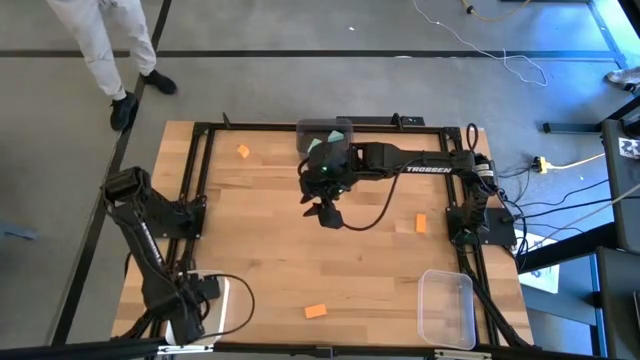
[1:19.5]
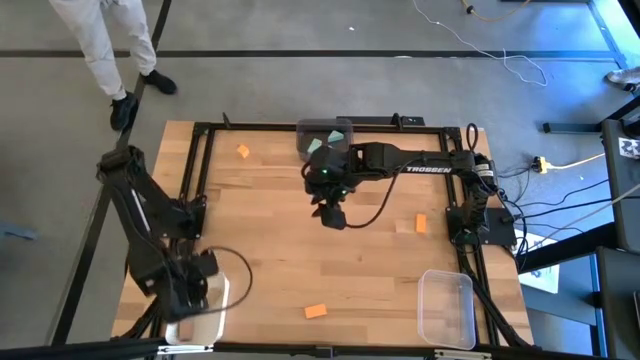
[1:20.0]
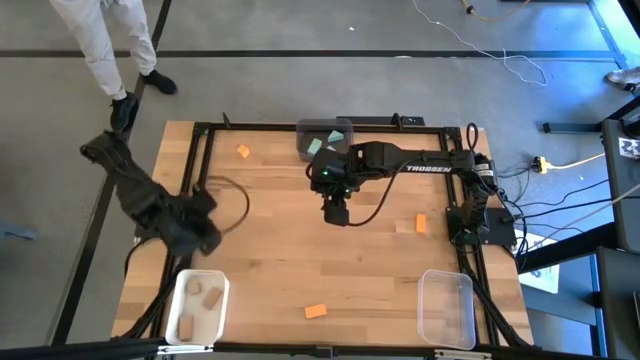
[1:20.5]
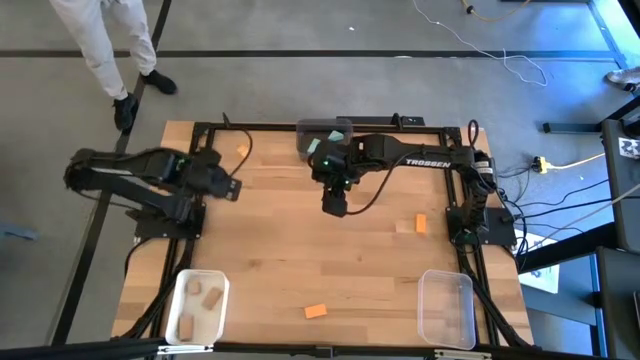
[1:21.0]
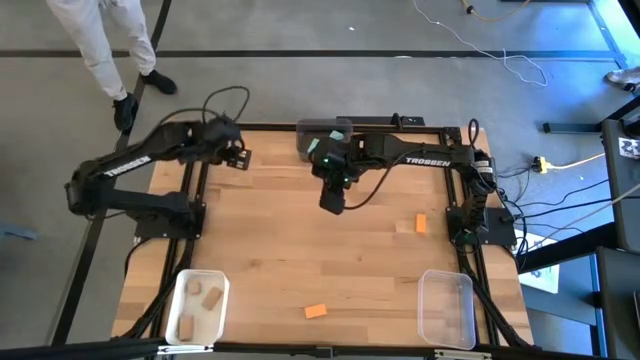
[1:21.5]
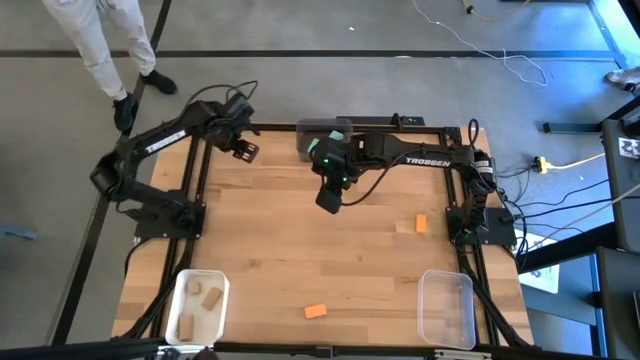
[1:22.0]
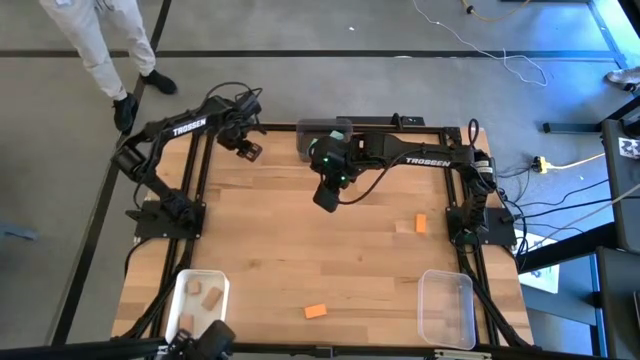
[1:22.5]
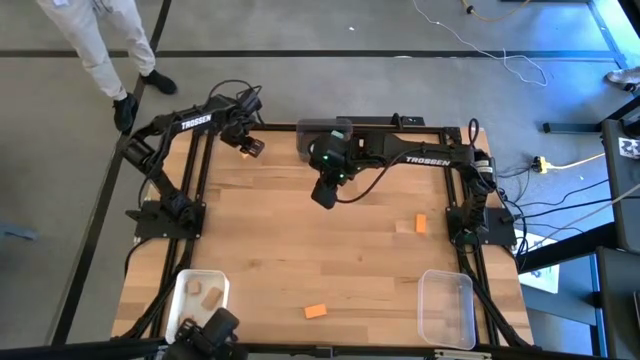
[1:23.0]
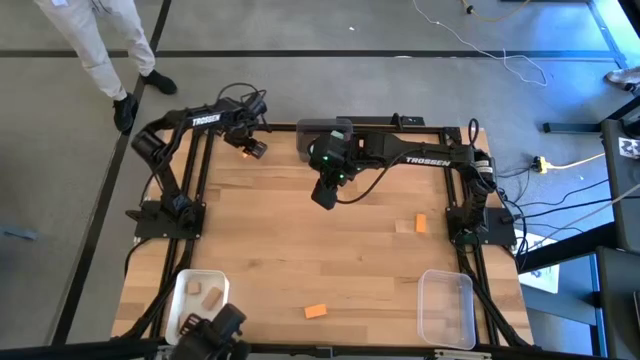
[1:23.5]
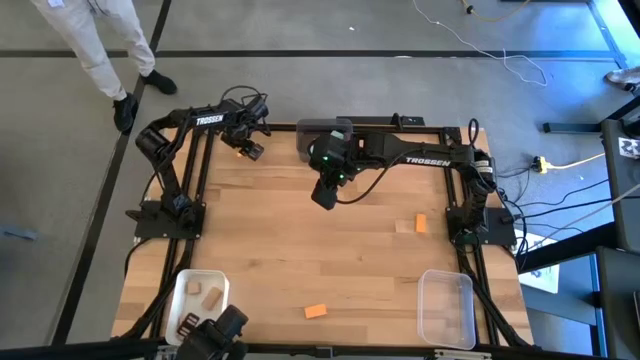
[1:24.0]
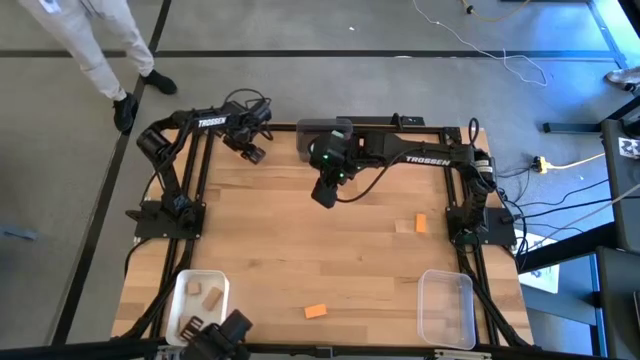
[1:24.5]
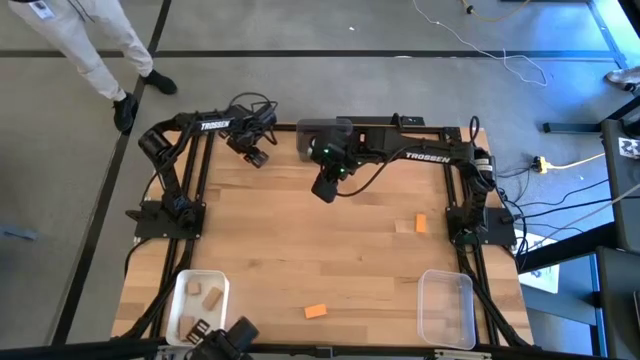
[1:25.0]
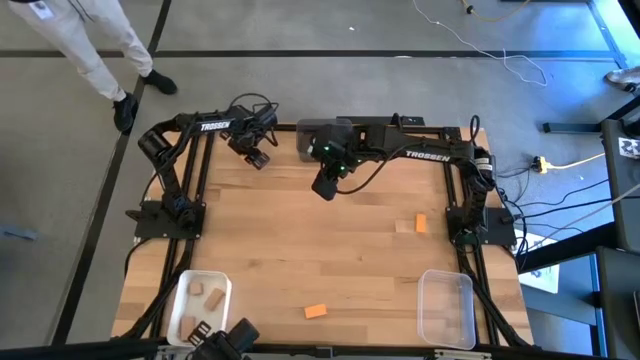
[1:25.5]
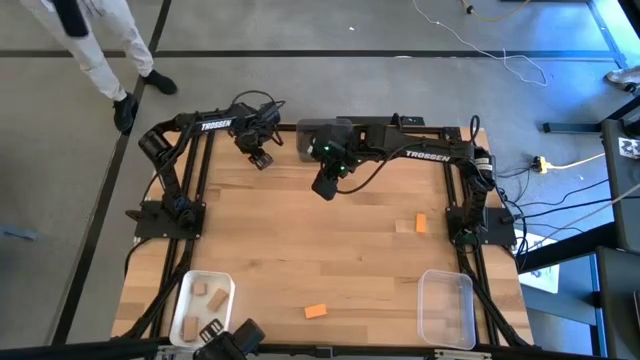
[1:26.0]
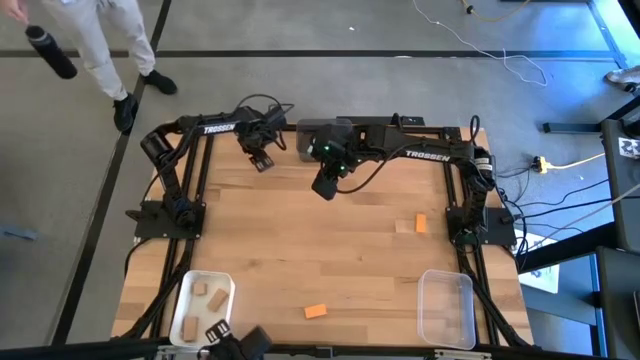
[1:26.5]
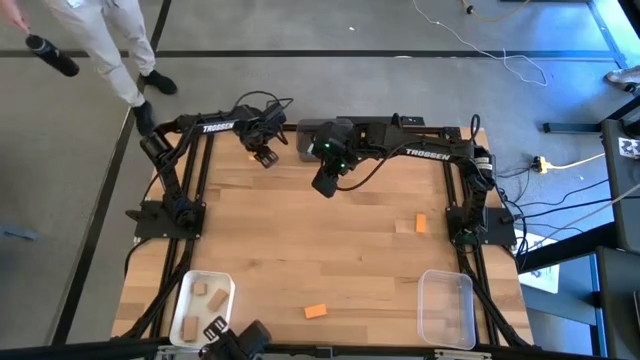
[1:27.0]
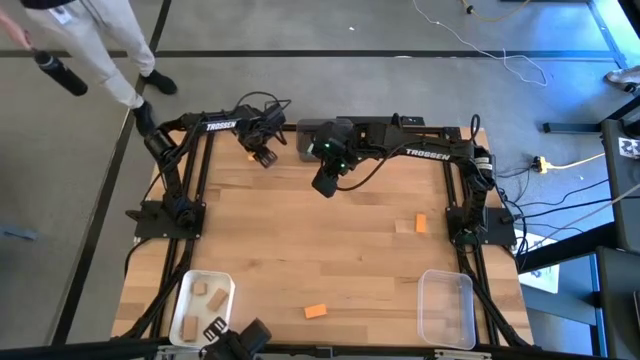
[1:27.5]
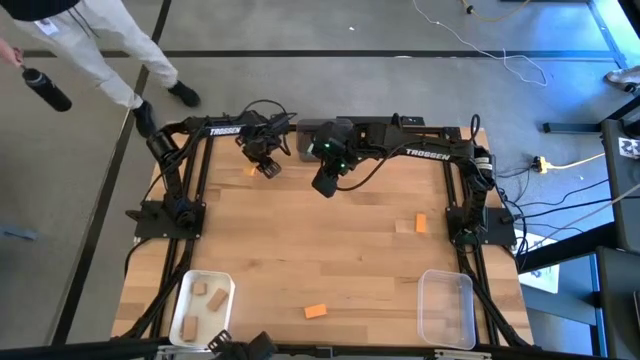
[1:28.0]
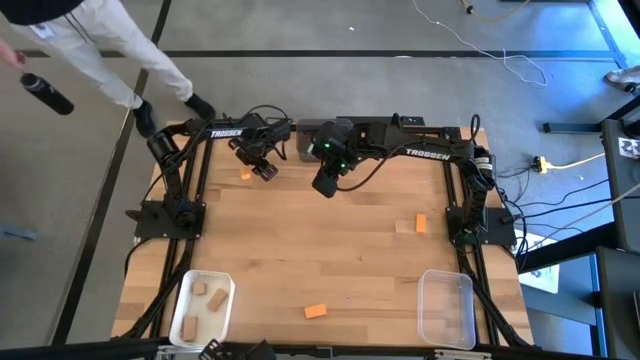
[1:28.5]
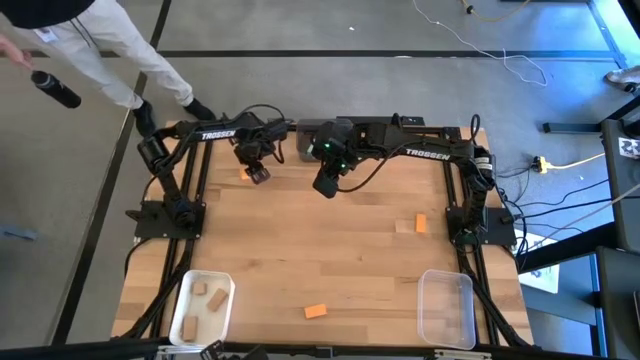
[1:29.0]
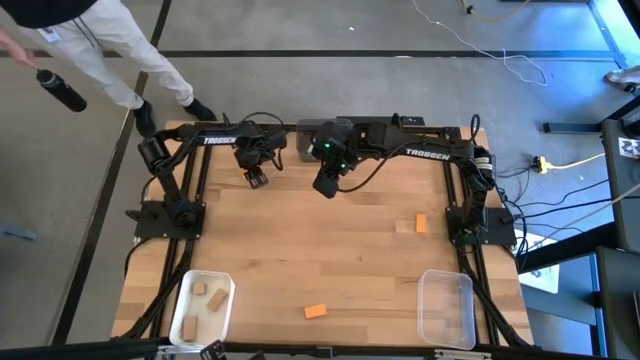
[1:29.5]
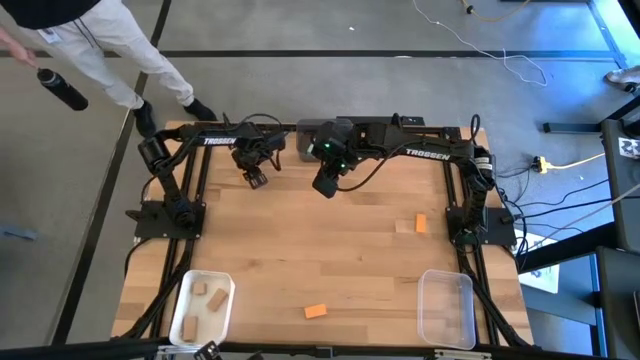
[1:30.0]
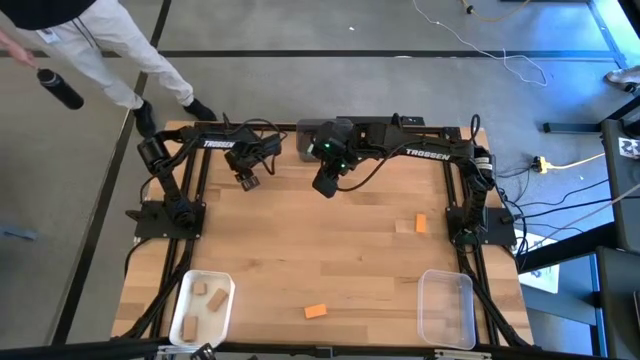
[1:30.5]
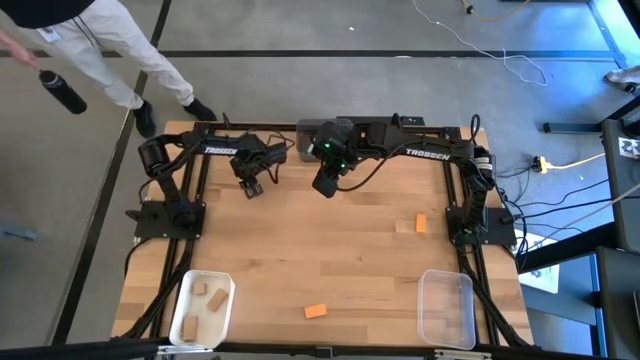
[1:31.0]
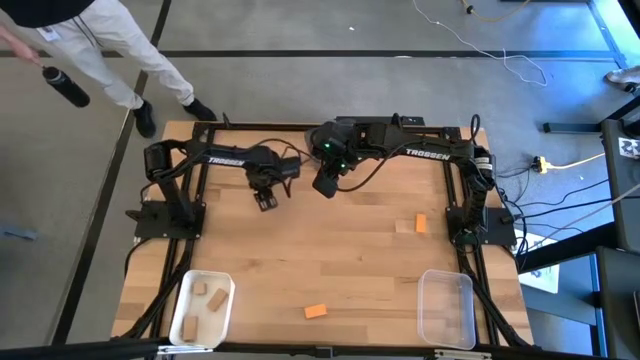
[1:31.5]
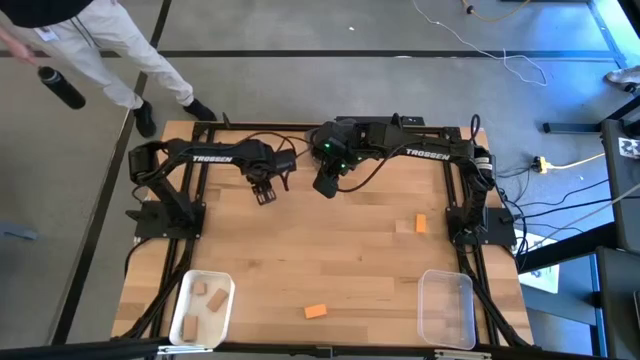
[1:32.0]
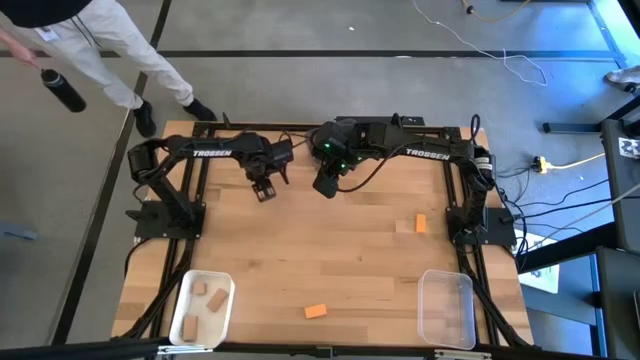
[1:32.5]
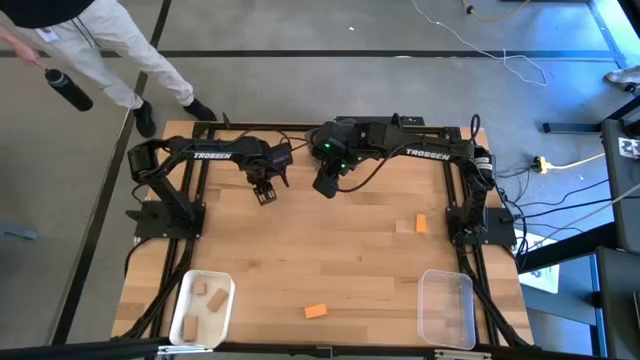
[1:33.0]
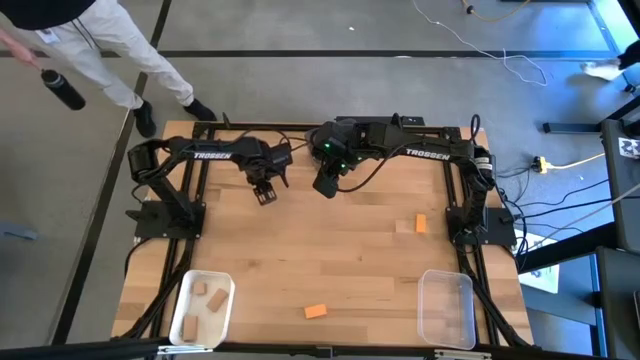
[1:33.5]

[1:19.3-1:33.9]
Task: Sort & place blocks by color
Put the top orange block into the transparent bin
